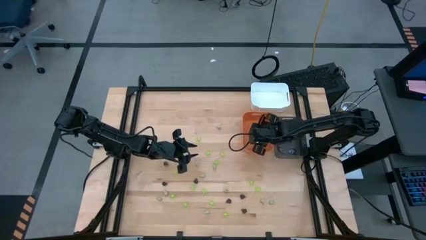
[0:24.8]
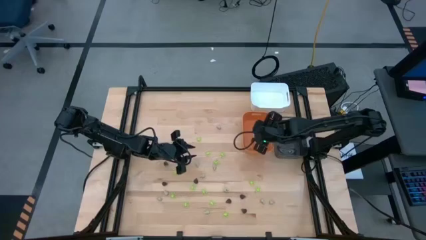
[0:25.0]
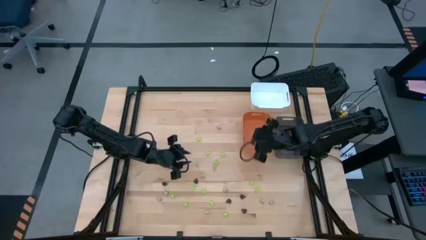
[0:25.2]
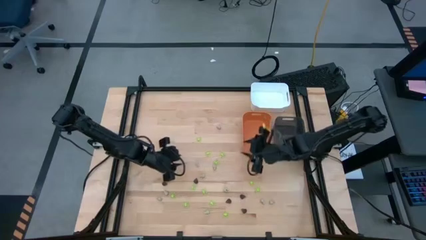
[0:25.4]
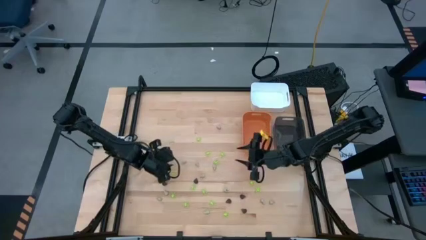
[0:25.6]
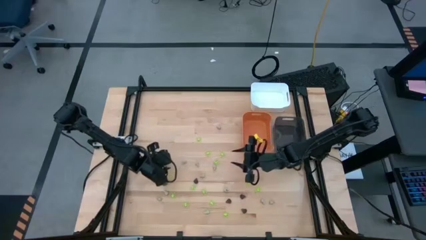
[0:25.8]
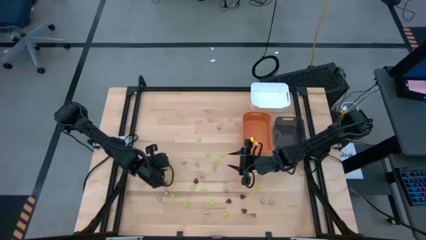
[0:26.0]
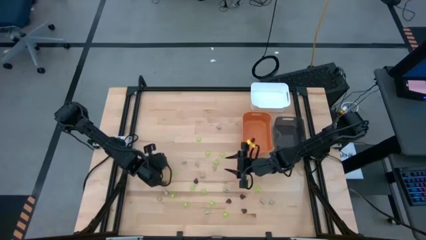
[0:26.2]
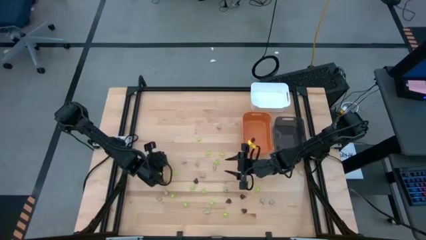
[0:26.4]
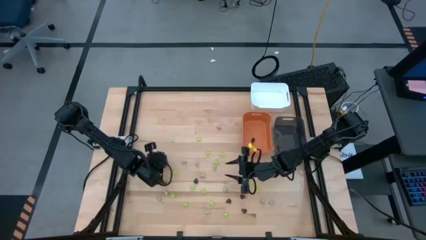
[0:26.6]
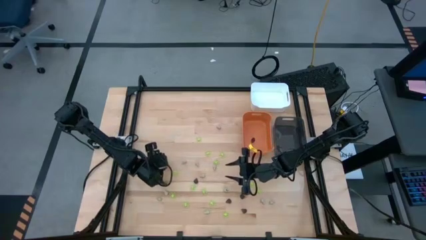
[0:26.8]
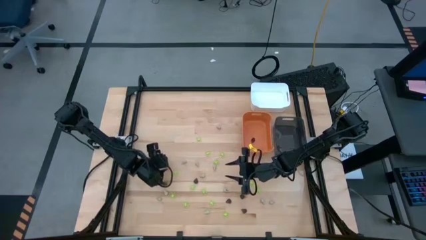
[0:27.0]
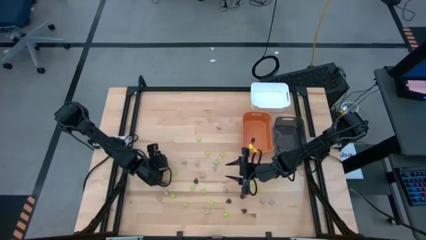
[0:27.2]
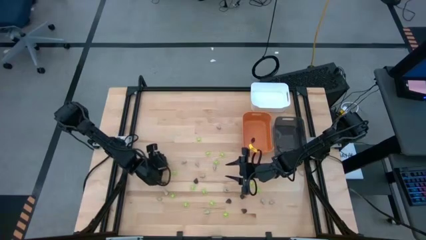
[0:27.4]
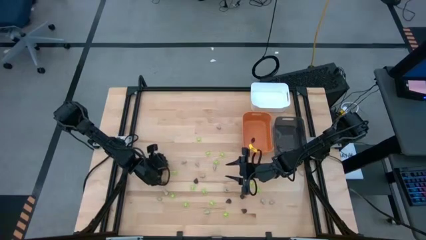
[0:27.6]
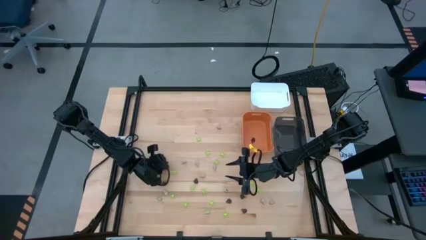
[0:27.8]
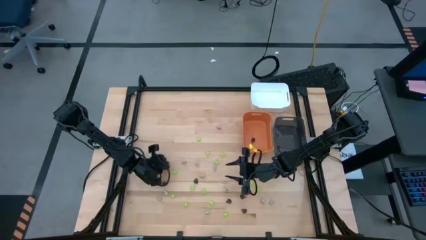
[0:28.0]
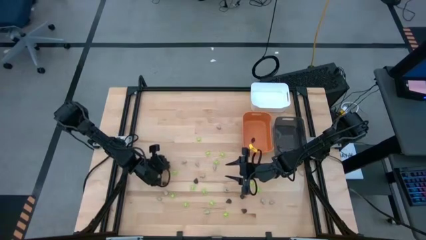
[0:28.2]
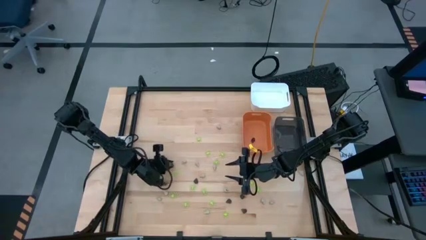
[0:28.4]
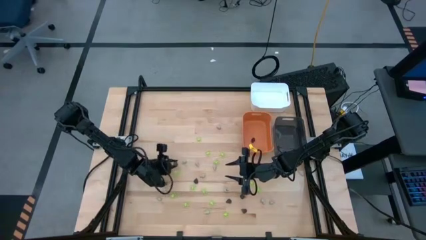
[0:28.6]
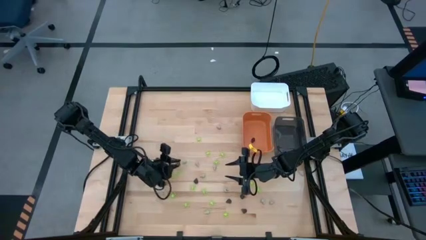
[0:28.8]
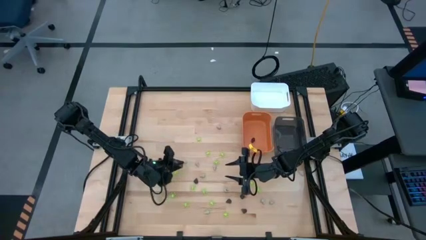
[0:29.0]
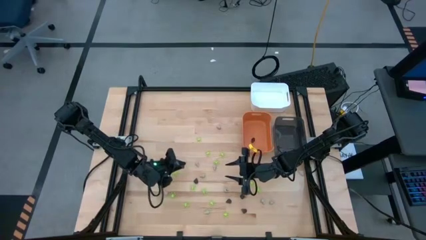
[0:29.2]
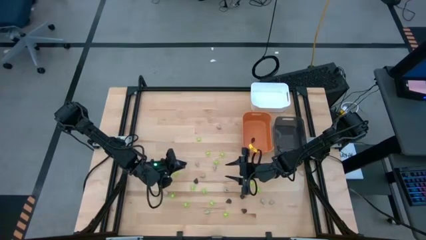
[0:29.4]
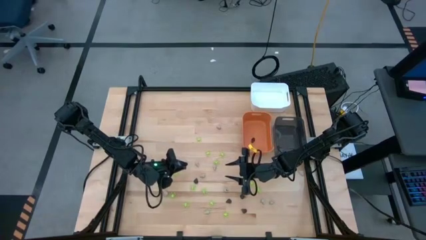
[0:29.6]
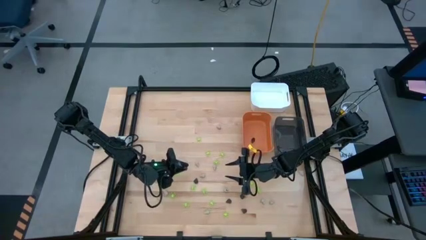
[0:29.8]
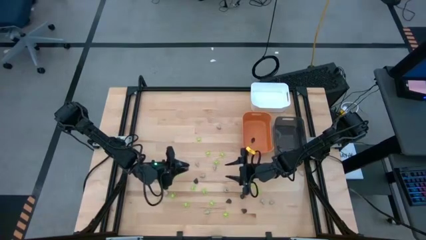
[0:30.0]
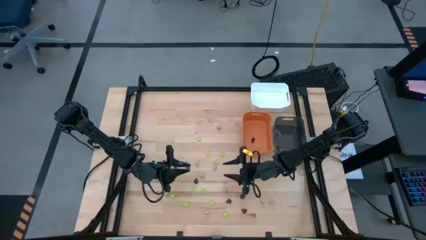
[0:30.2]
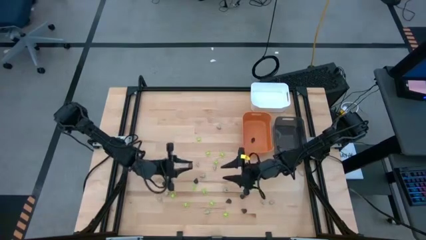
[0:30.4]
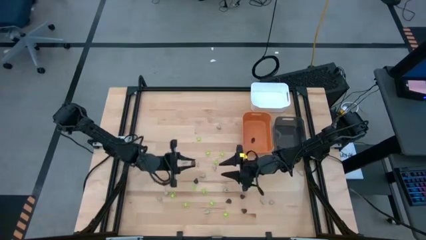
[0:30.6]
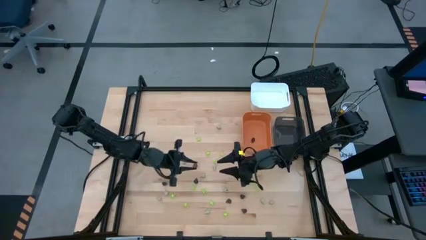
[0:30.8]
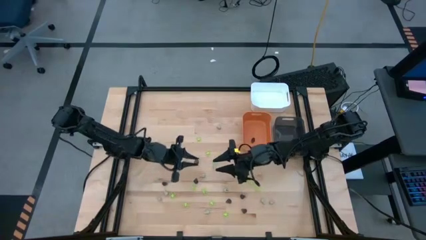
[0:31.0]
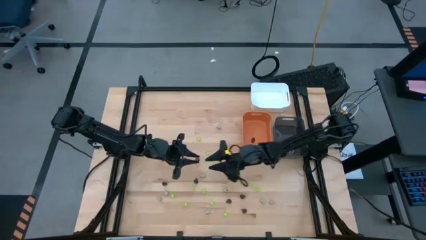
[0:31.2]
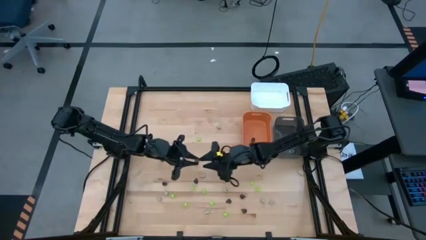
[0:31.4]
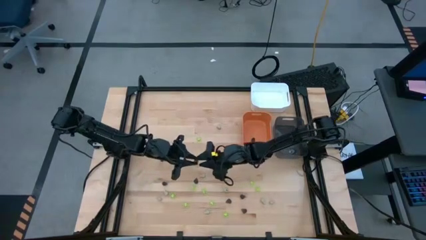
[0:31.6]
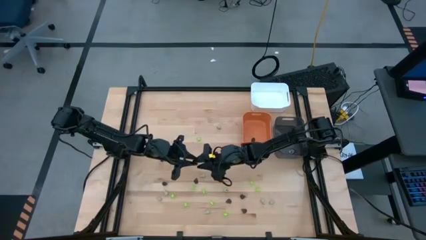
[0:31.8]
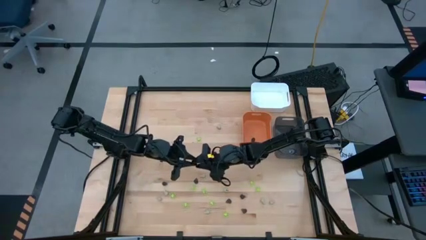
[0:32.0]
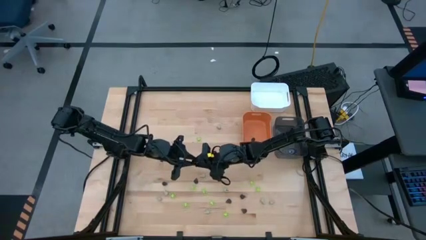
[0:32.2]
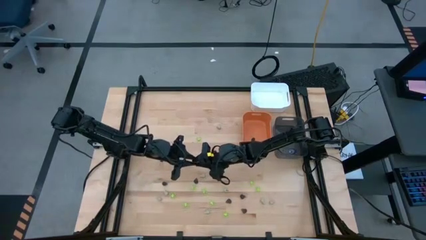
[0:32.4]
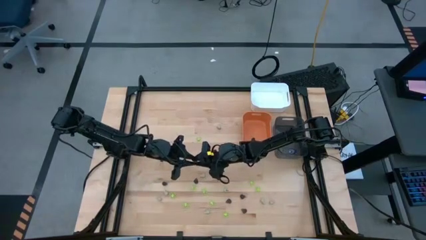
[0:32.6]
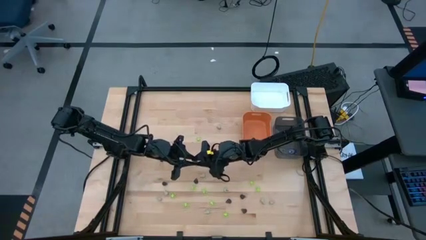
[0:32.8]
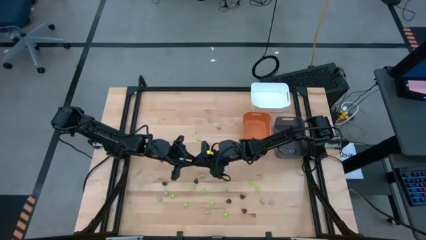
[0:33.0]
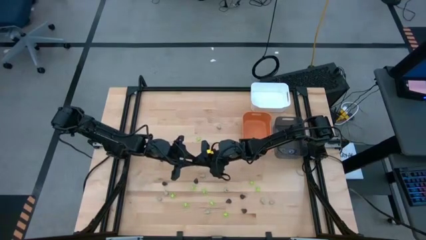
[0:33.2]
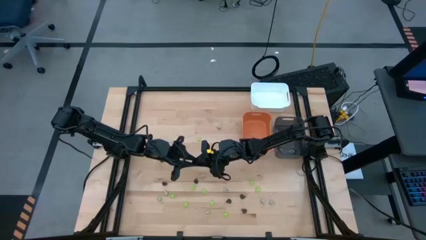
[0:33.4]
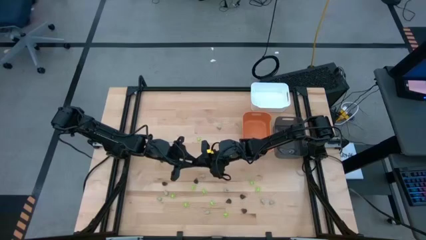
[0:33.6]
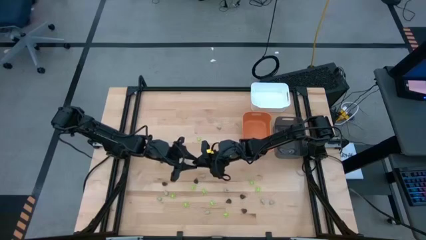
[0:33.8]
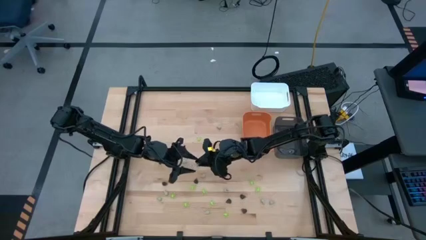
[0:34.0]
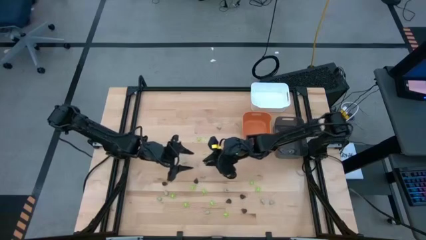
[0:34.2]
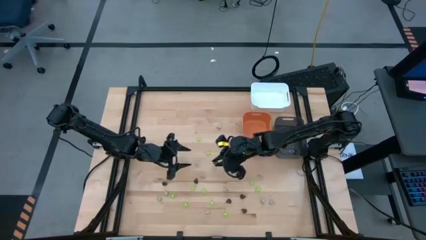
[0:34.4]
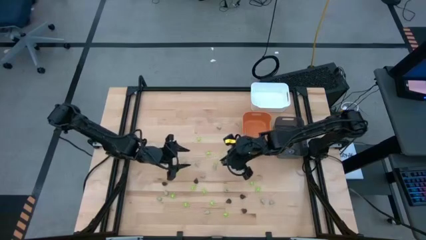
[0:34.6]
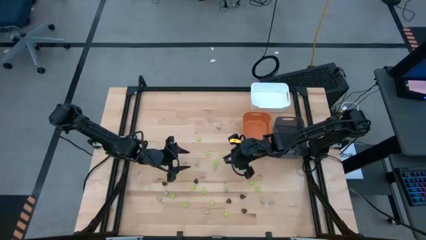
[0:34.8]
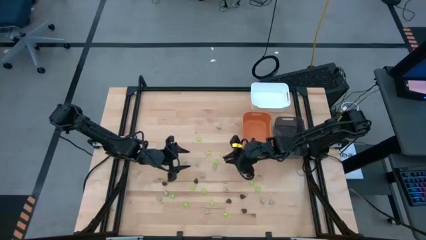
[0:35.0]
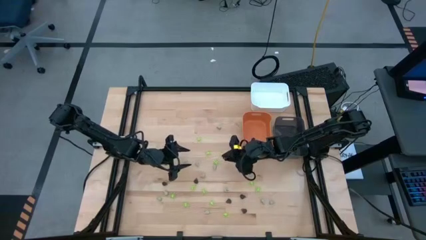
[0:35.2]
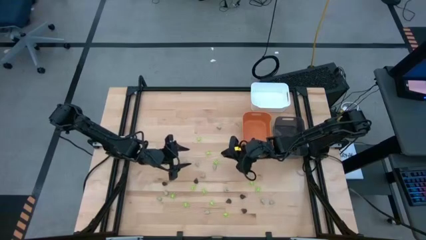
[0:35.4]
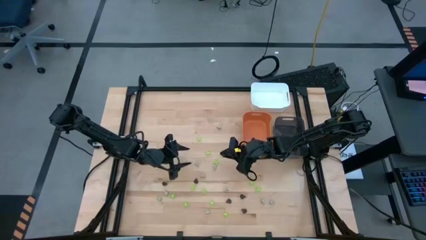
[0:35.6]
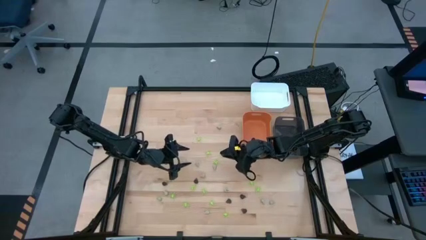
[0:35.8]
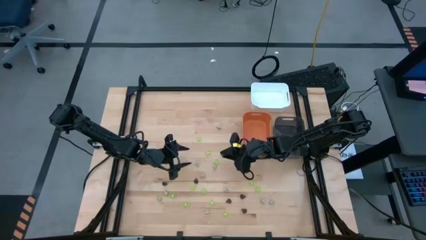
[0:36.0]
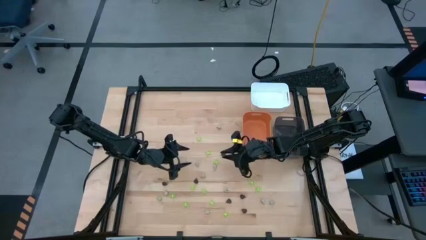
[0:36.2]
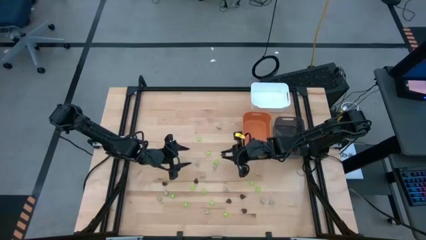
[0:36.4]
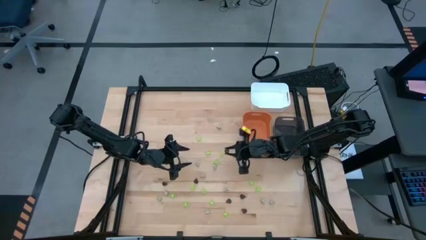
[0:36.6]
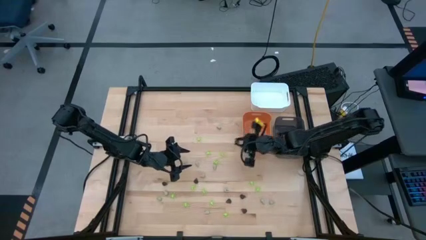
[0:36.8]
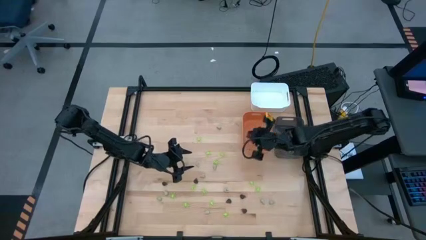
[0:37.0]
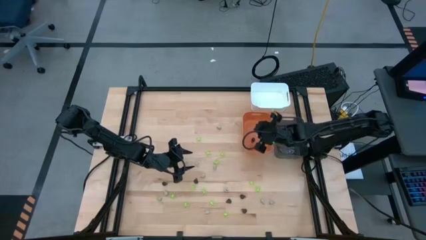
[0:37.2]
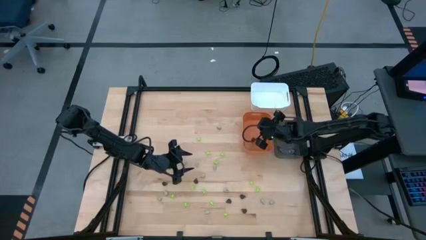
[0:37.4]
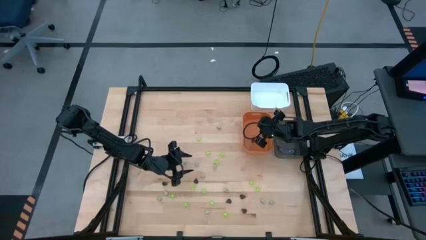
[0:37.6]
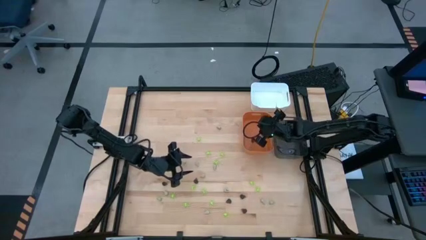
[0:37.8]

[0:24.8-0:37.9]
Task: Sort Halloween decoration
Put the black skull toy into the orange bin
